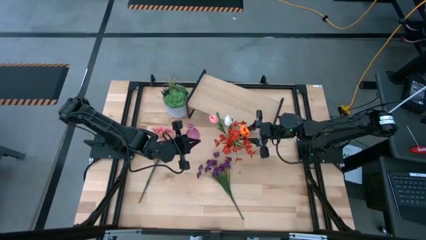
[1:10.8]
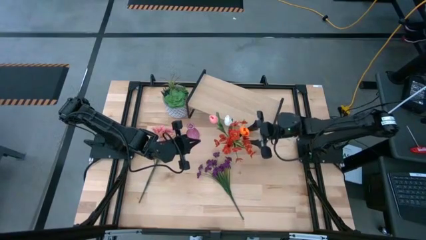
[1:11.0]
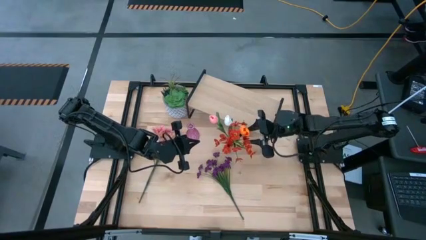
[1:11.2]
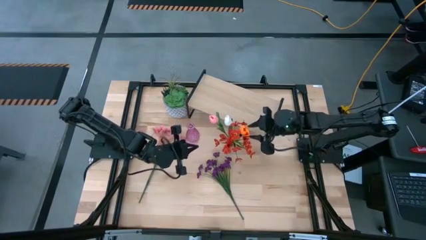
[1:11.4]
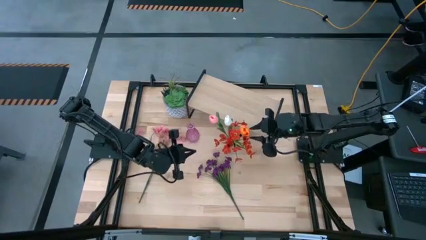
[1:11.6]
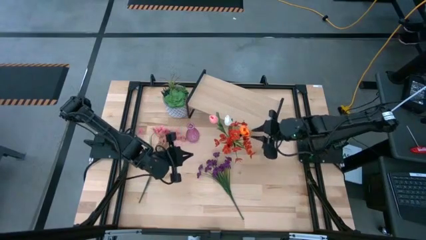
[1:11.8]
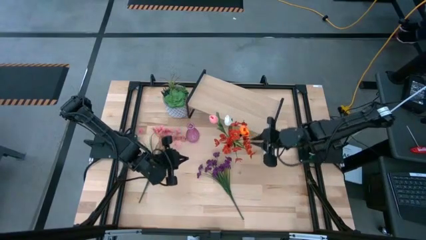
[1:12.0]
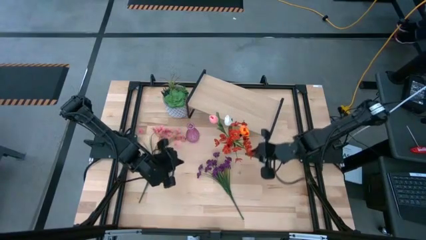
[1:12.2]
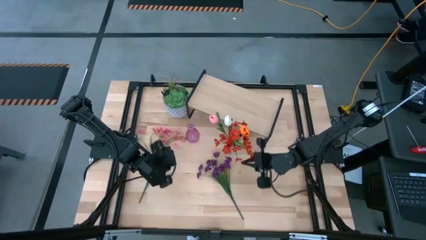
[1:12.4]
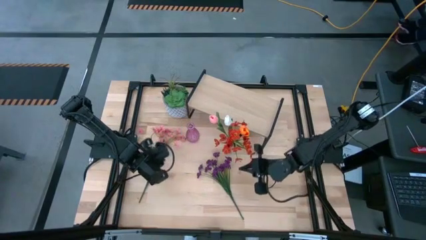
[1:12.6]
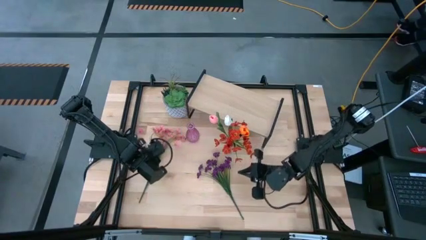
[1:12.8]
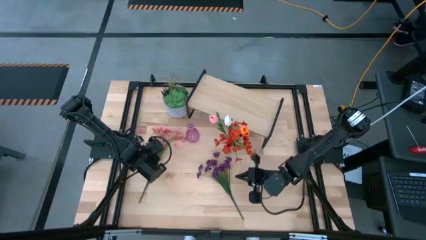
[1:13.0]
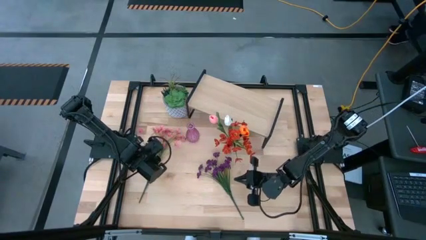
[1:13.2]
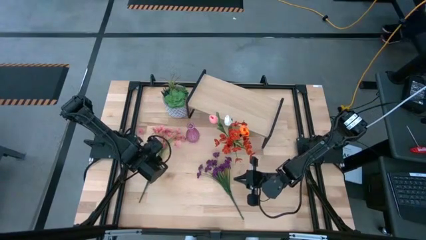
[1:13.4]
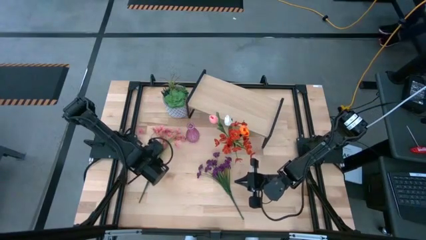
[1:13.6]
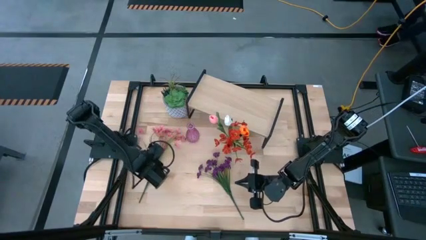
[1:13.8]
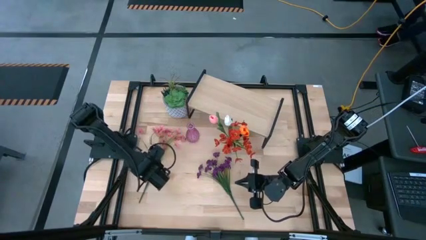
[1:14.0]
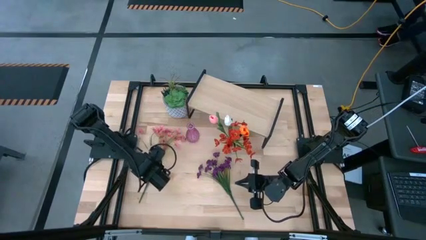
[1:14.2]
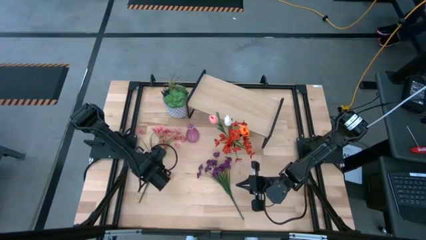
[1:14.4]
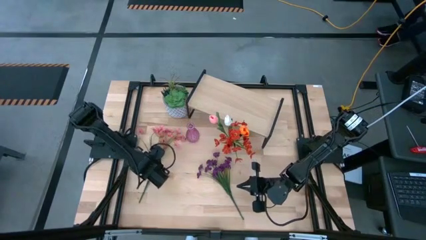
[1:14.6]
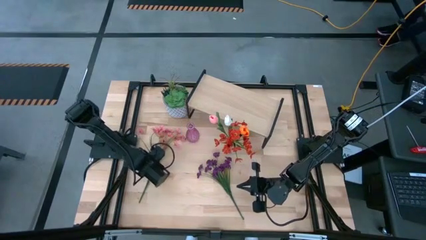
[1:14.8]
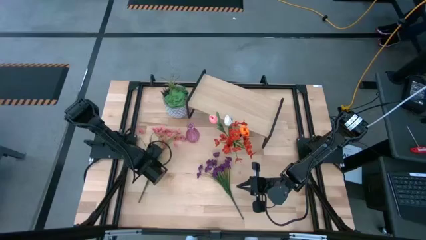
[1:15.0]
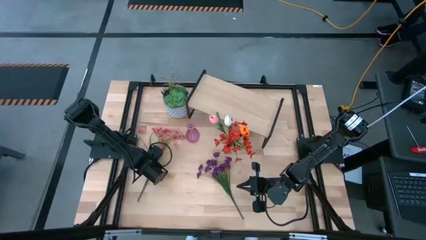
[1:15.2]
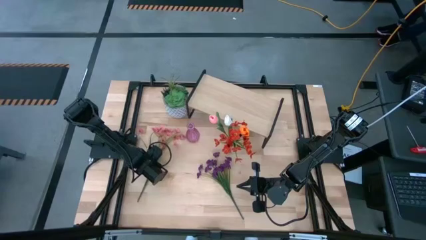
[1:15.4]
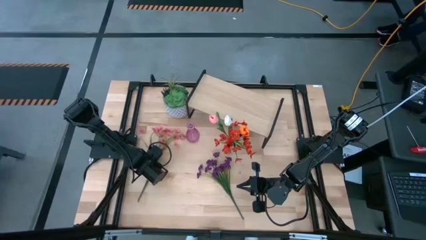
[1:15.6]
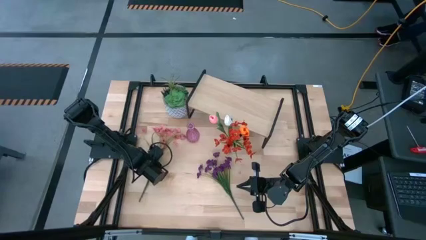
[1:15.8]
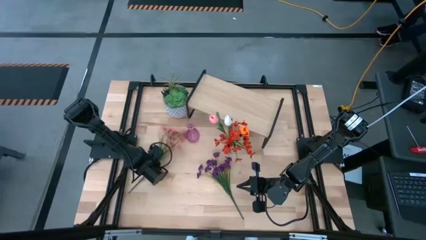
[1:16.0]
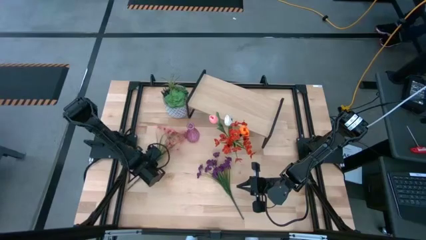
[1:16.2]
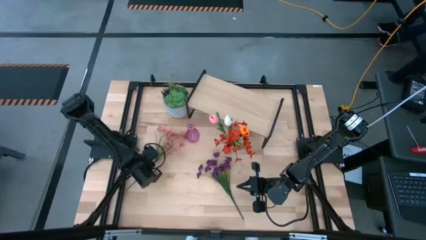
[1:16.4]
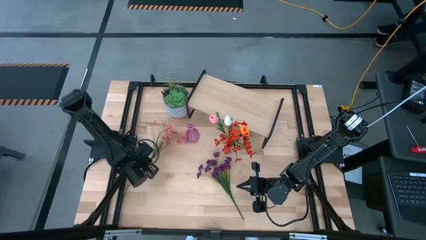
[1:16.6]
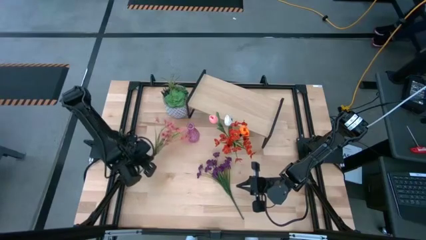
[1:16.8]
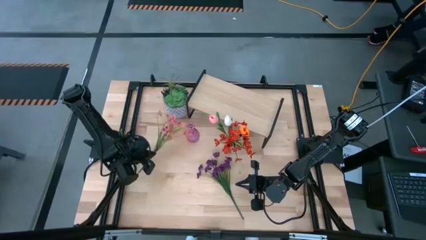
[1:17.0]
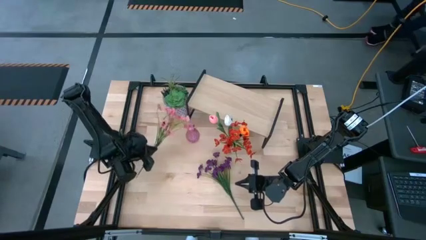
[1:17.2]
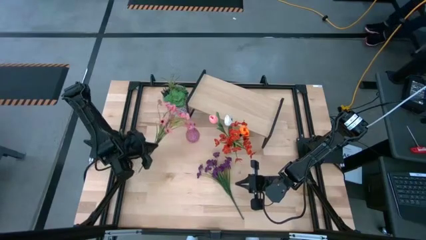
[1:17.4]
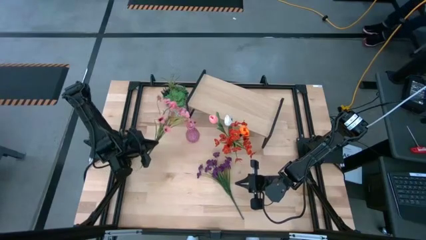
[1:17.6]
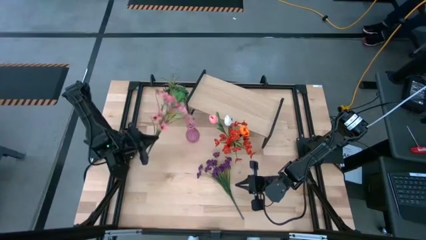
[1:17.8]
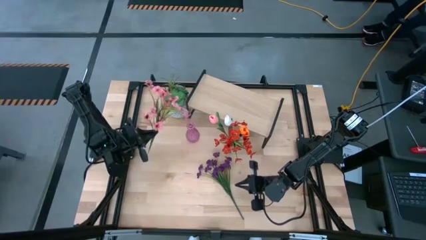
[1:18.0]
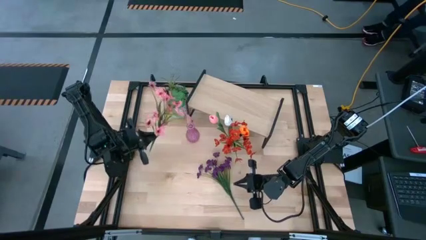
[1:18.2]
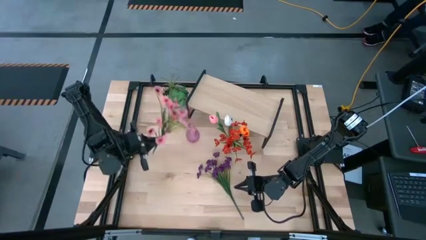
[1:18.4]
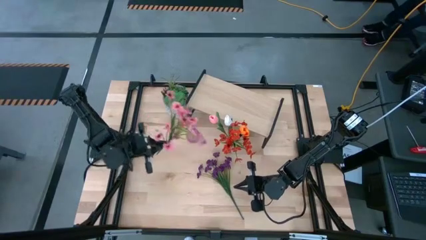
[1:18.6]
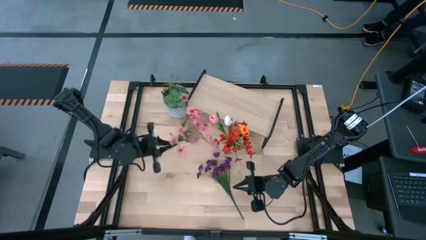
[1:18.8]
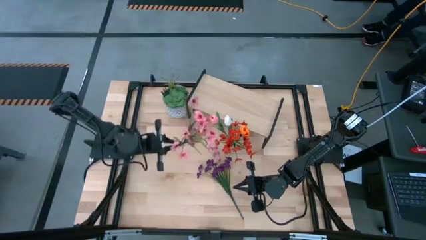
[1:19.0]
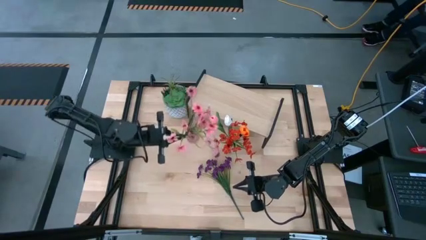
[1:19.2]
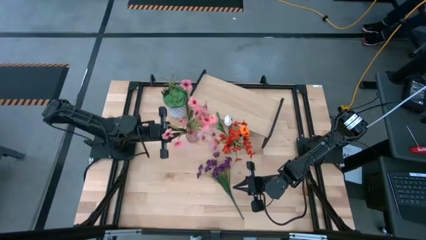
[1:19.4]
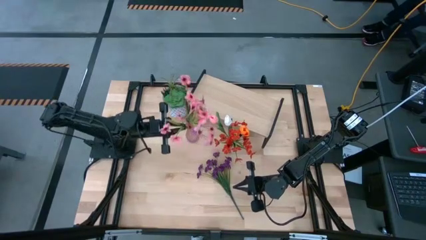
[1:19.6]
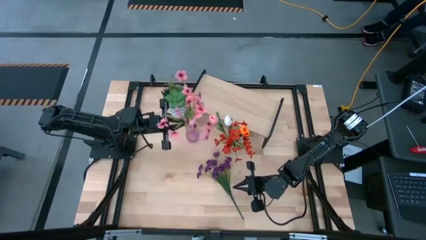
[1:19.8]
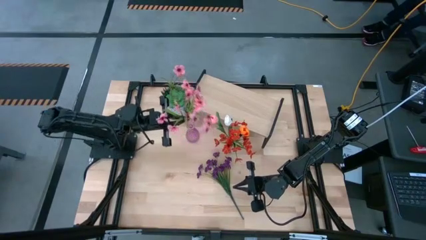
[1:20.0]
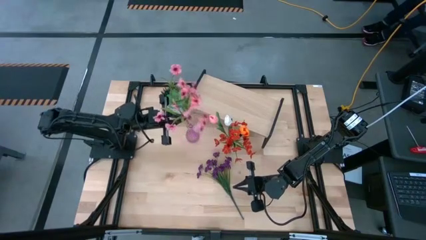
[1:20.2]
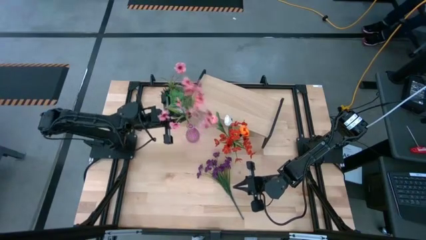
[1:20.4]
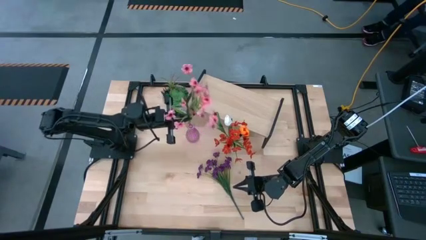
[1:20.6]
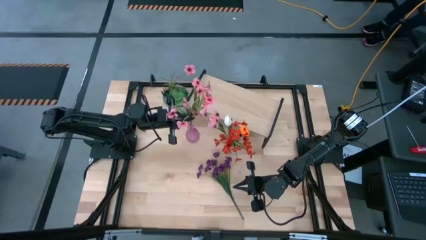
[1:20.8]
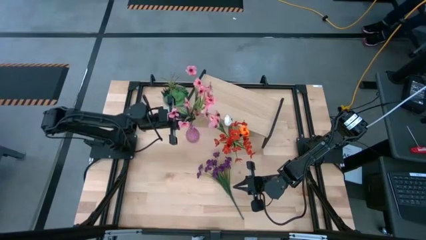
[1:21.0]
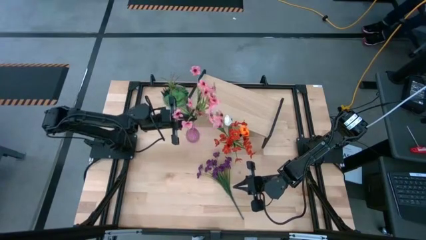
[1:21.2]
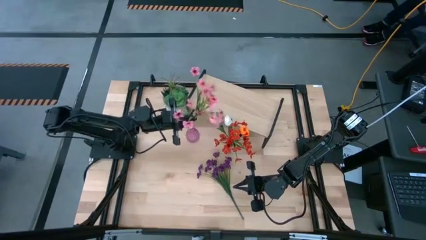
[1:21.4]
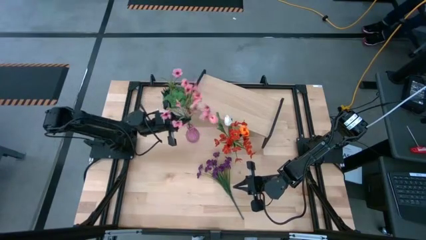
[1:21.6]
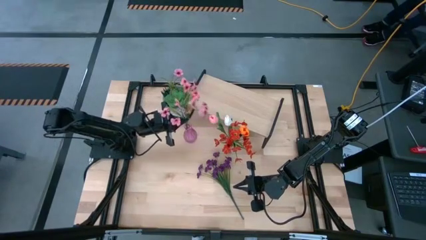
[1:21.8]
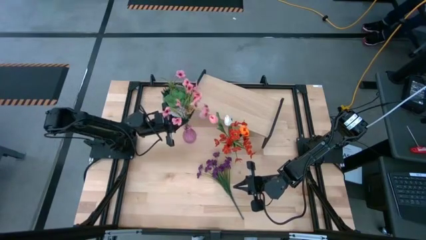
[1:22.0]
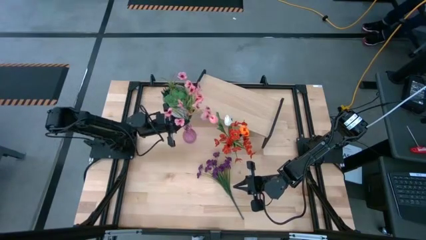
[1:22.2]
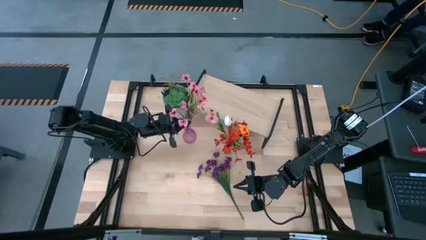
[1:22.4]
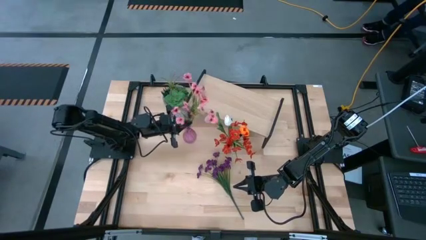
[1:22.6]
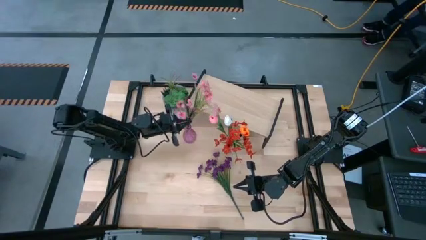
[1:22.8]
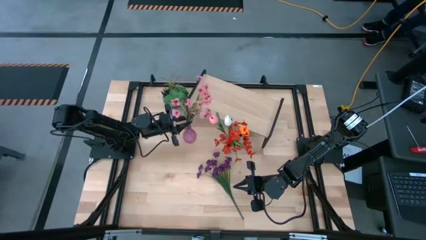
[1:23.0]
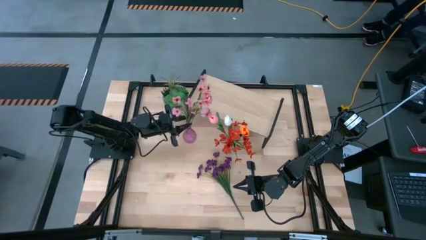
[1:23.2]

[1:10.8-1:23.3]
Task: Pick and place flowers into a vace then onto a shelf
Put the pink flowers into the pink vase

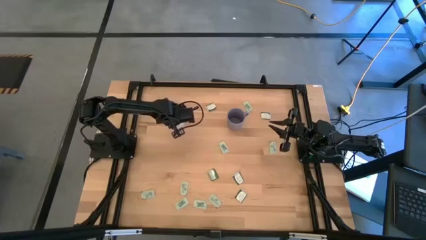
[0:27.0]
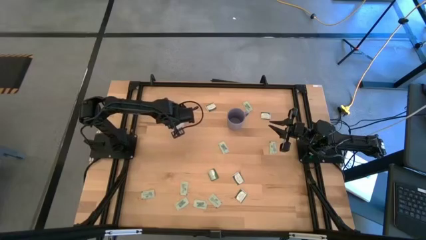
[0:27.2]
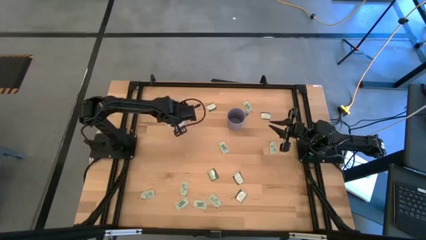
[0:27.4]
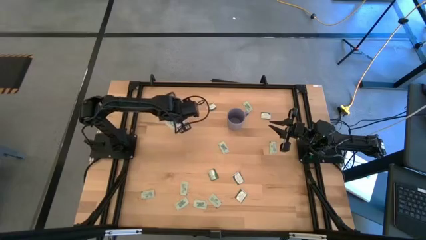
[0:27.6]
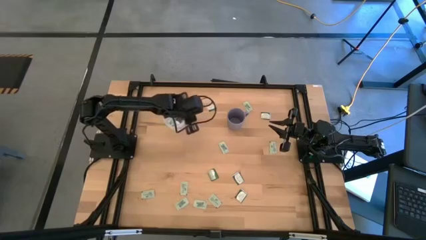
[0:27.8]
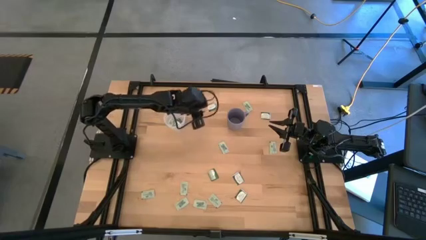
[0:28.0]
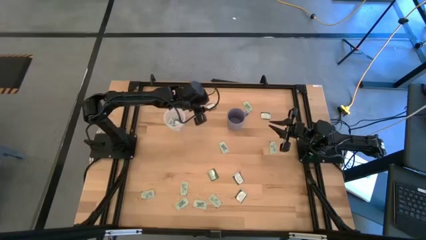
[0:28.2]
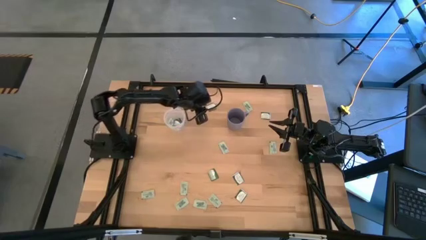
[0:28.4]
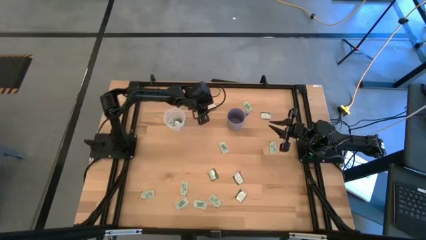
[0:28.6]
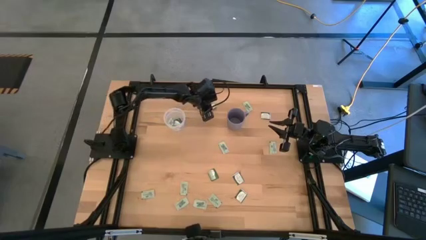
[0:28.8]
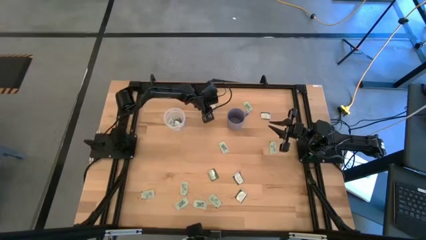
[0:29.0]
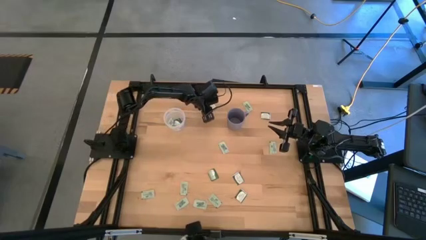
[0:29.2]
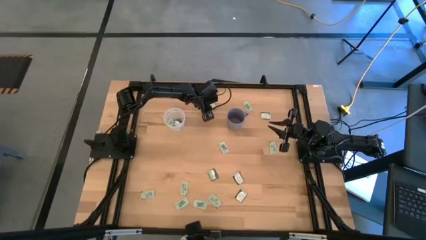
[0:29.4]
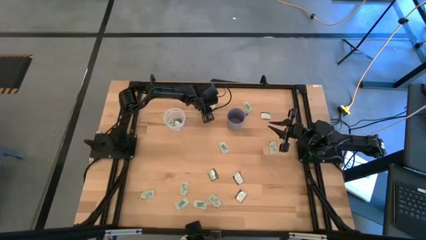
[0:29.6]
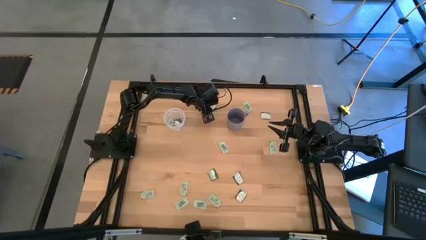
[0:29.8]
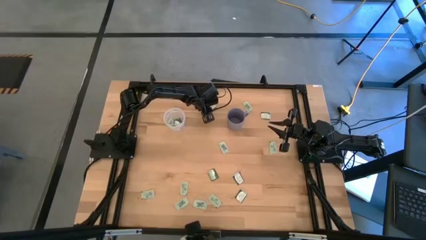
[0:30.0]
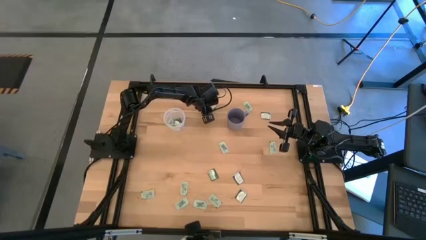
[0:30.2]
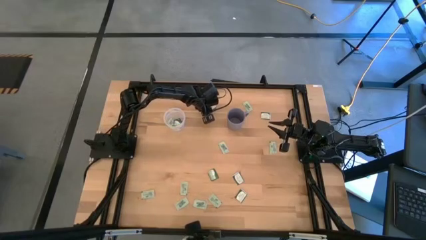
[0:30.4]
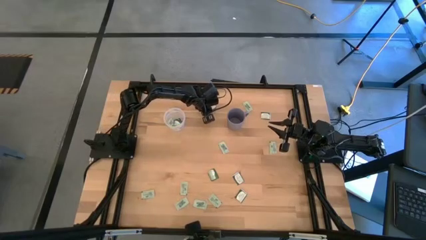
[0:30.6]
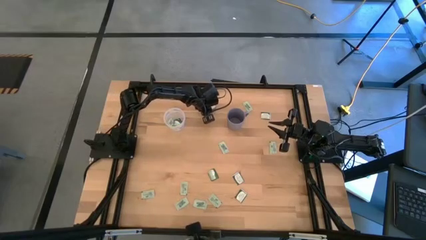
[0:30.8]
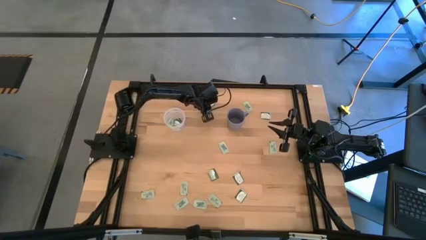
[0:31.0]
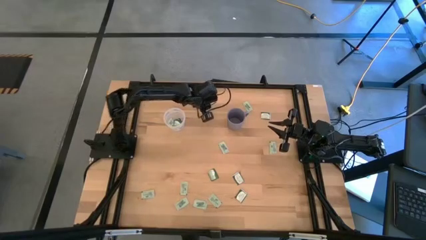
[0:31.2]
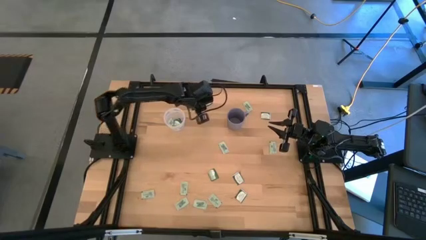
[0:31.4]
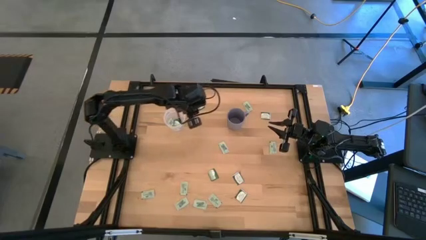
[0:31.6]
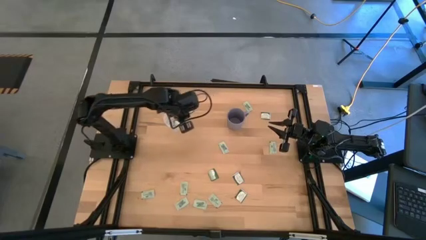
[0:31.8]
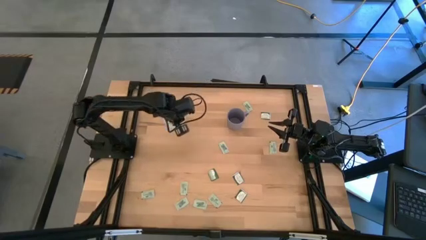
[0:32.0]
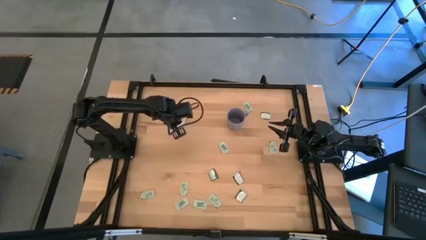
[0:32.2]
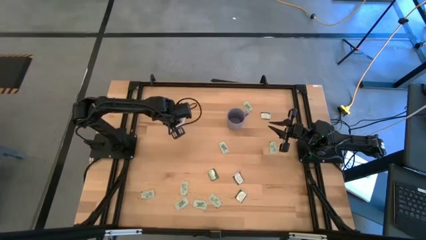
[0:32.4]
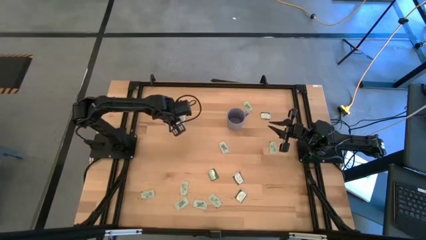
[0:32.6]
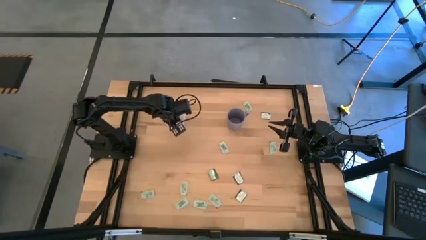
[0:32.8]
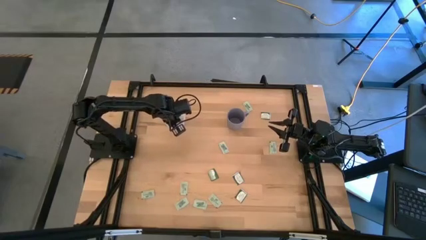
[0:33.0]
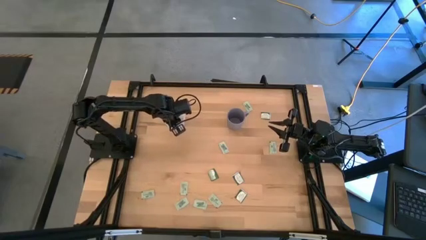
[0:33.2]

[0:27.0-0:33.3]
Task: Pick and place Stevia / Truvia into bins
Put the green stevia packet into the transparent container
